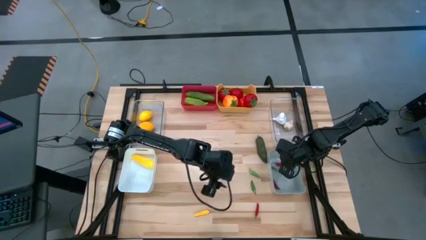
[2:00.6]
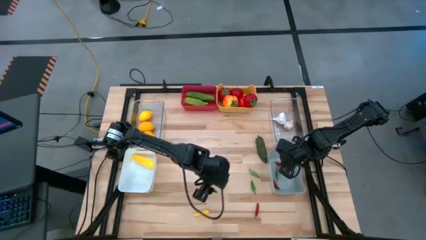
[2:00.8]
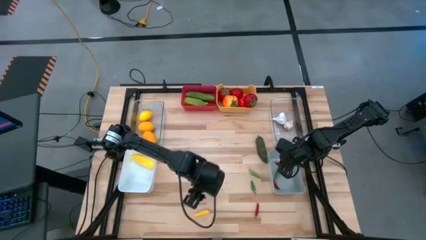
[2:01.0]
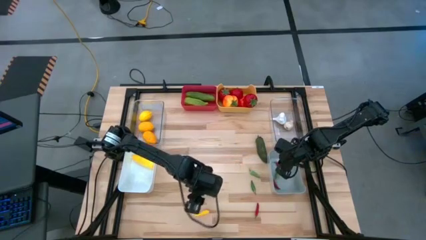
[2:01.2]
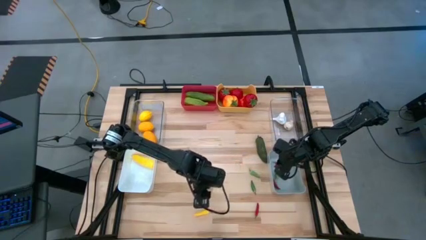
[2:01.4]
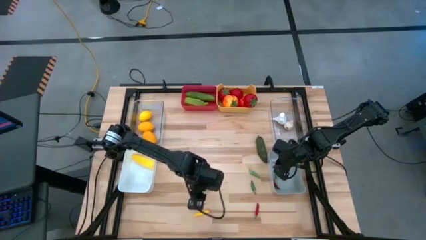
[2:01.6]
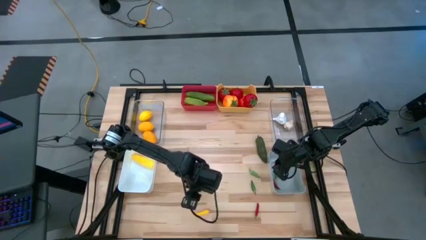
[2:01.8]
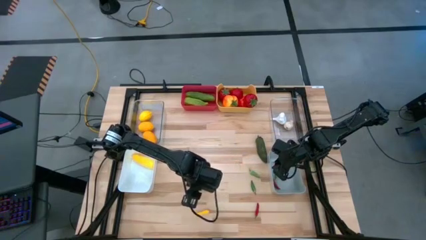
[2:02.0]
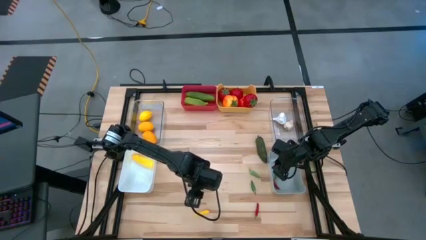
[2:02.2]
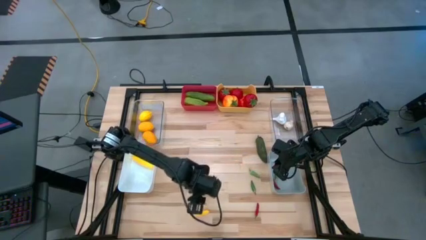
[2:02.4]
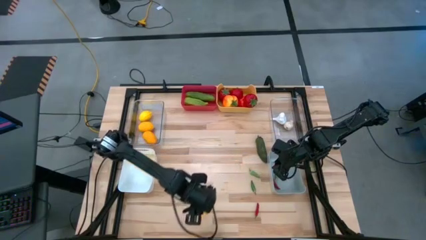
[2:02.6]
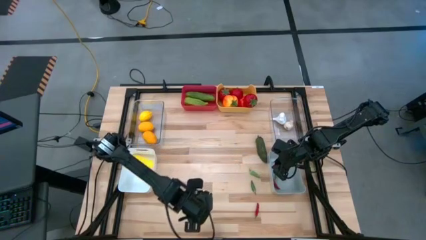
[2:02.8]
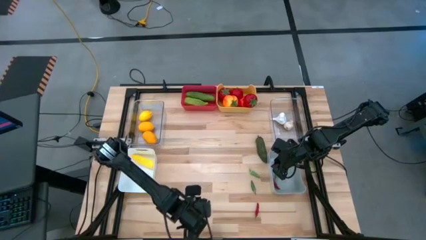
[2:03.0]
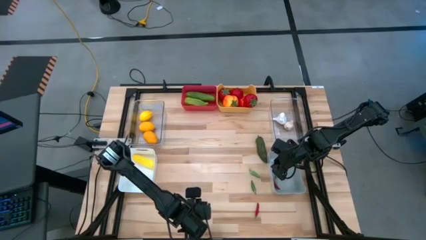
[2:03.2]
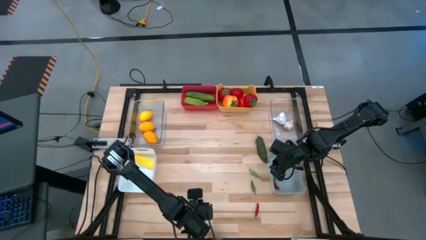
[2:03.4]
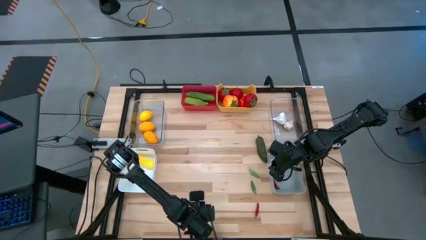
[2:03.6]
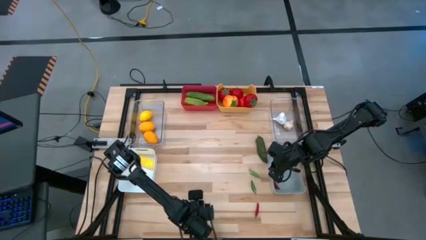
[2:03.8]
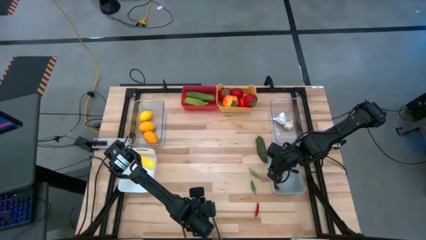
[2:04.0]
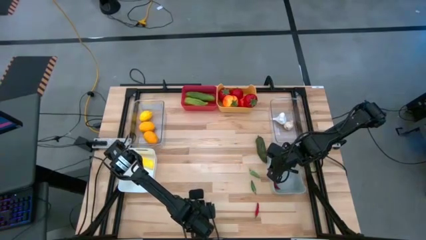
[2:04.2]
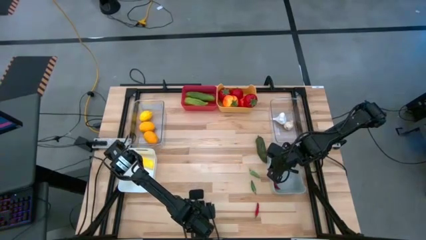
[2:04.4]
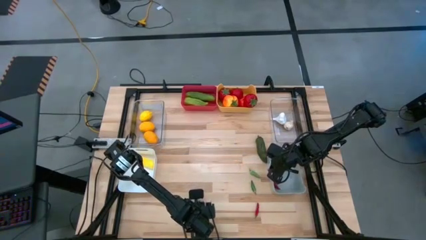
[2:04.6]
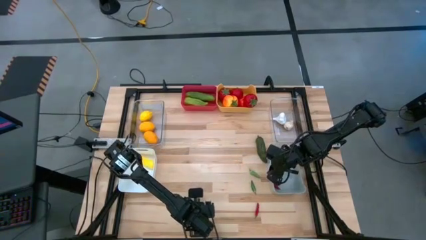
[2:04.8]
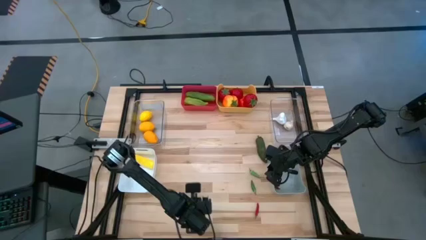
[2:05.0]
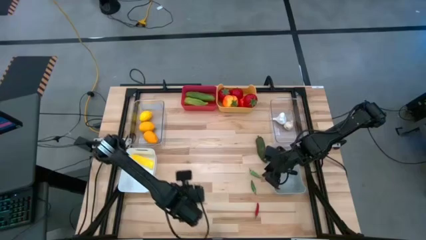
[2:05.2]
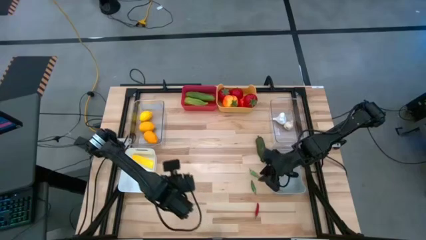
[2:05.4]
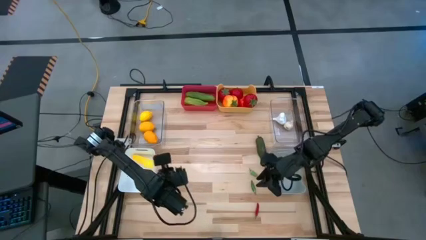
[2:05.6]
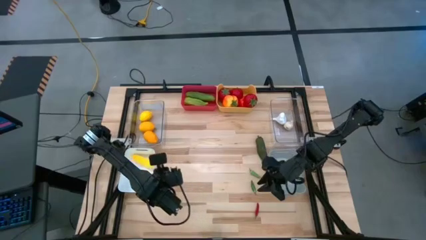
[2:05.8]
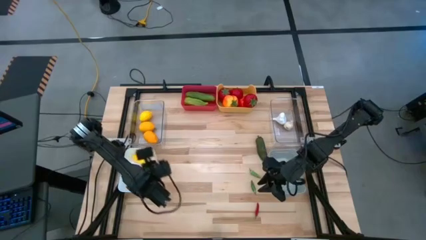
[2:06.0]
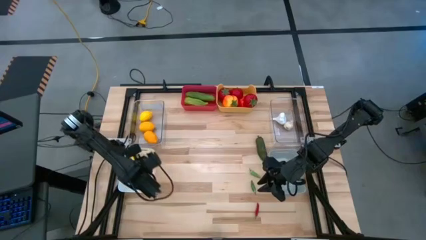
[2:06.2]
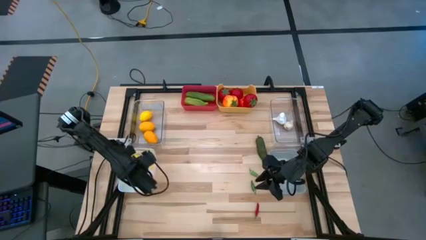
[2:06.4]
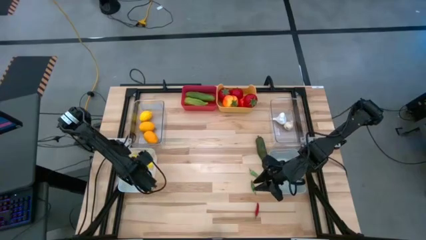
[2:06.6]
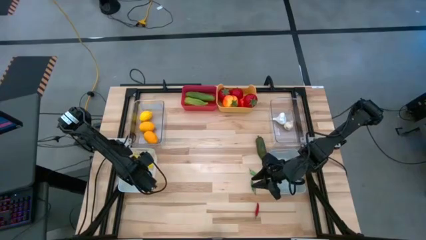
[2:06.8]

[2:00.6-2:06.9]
Task: Sort produce into baskets
Put the yellow corn into the white bin

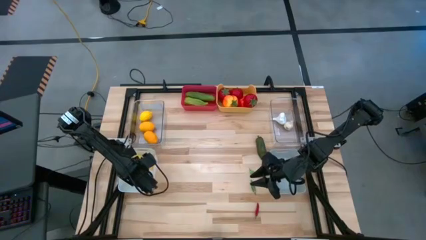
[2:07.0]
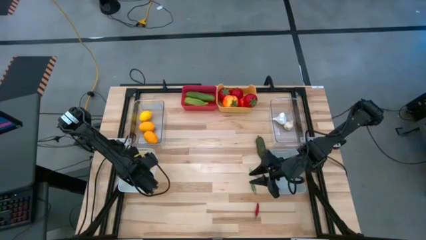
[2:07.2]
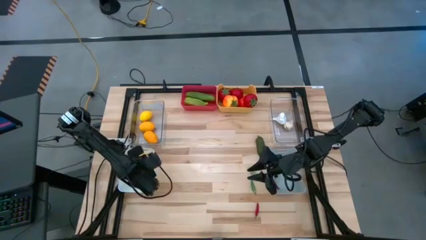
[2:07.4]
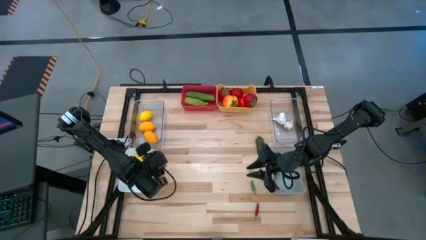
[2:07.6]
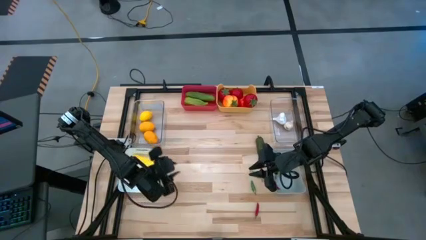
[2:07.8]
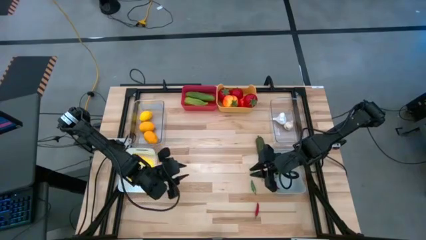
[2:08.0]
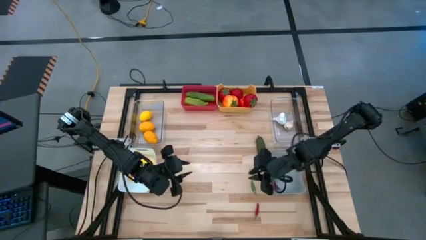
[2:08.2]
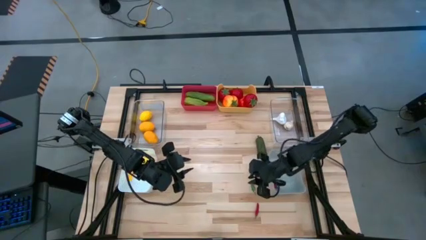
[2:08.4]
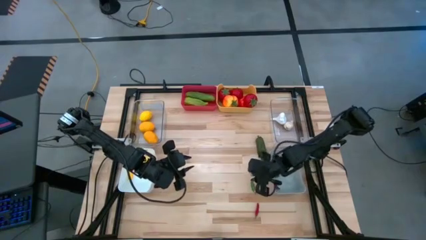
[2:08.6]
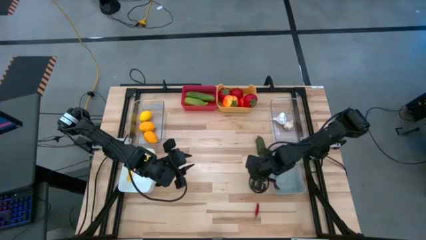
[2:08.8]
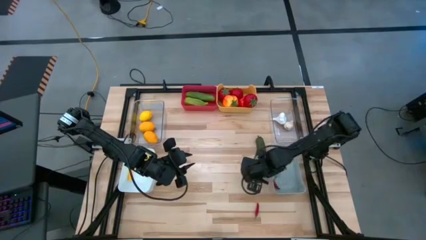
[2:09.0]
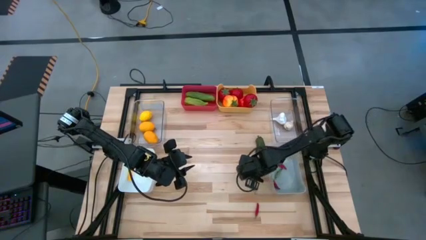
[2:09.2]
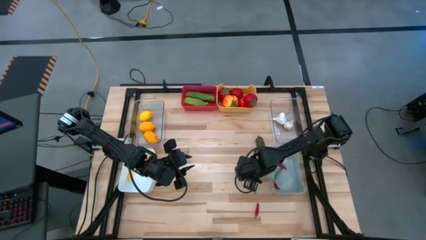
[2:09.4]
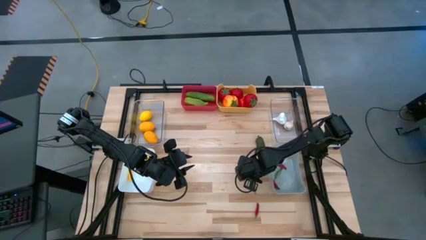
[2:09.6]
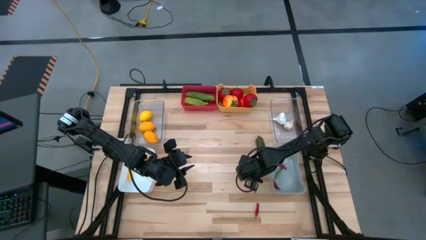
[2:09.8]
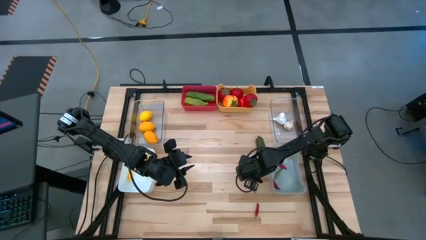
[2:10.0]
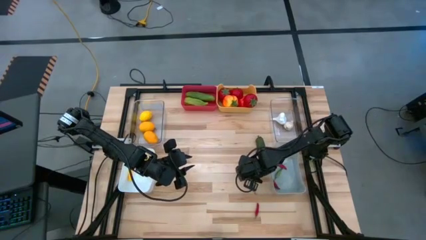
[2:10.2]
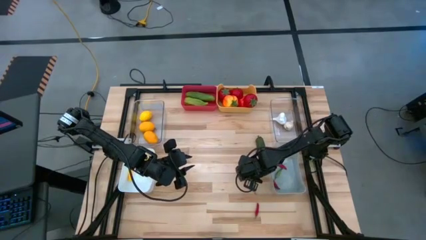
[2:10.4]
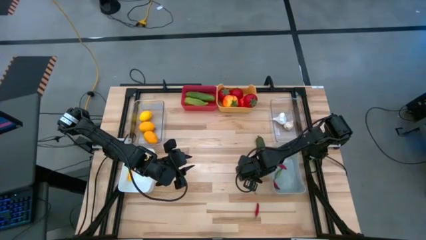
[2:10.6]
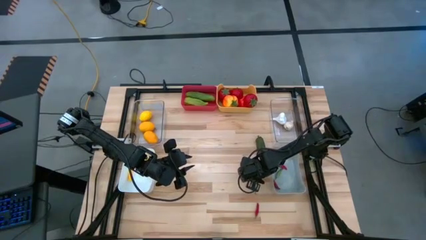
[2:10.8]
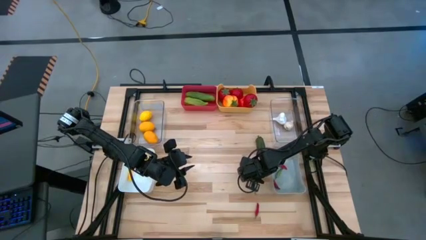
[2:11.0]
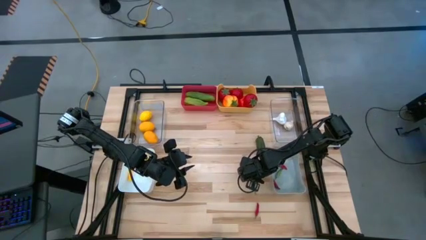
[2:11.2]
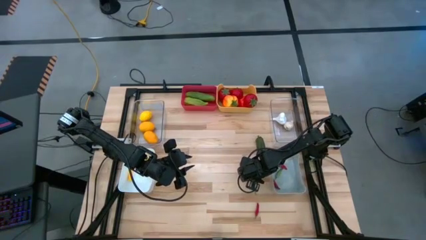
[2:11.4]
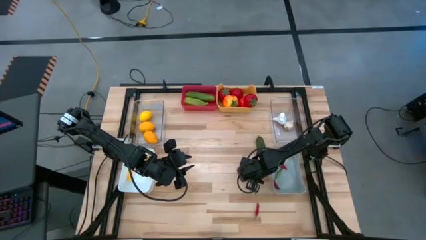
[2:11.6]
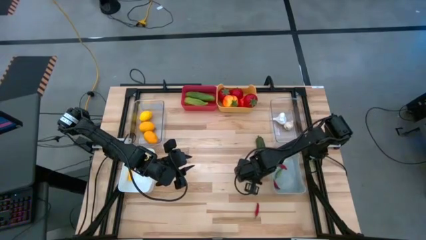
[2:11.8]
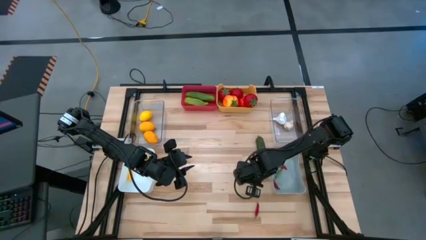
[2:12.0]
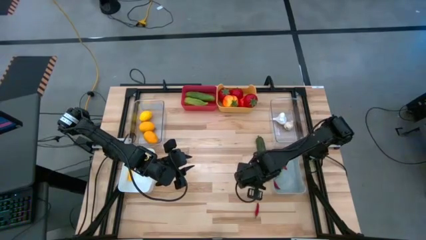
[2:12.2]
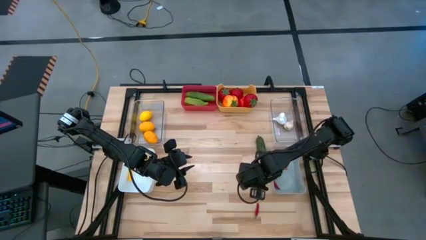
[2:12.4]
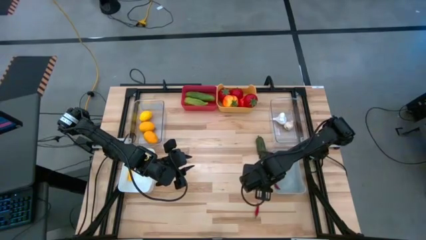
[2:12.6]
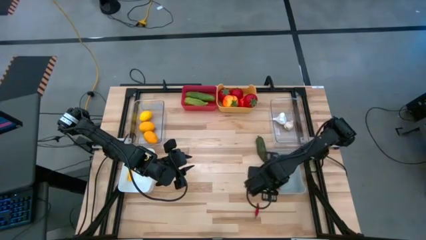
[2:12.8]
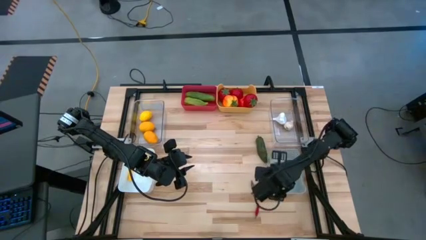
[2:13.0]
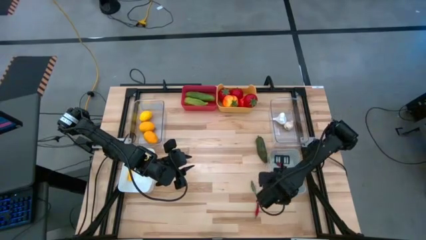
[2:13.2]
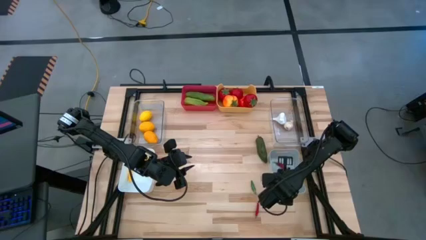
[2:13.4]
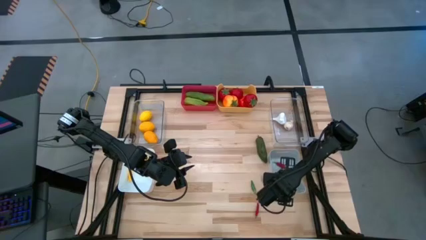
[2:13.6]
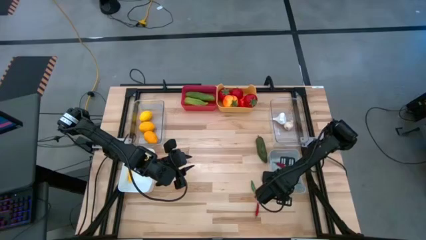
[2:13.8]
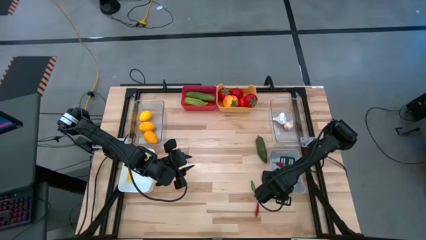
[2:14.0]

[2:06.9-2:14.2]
Put the green chili pepper into the gray bin

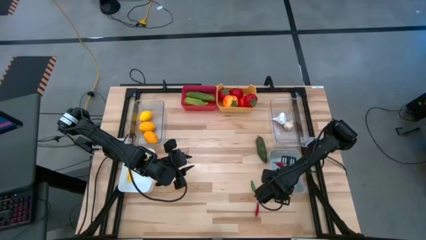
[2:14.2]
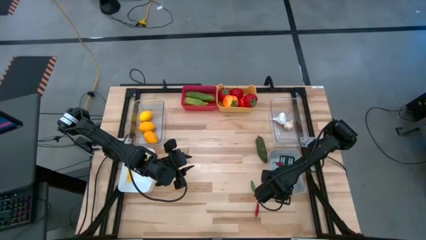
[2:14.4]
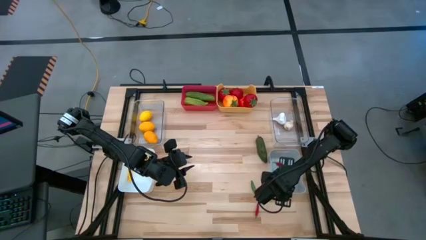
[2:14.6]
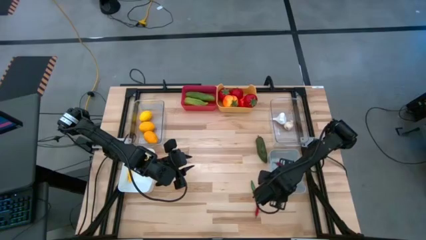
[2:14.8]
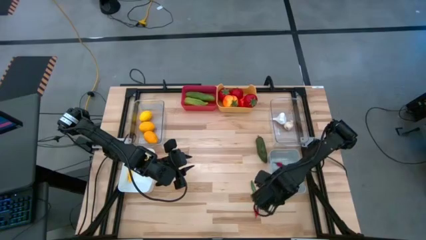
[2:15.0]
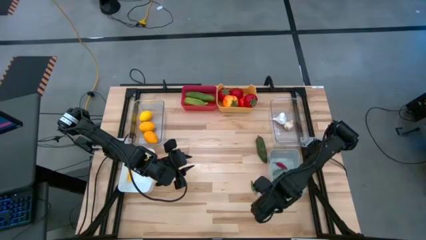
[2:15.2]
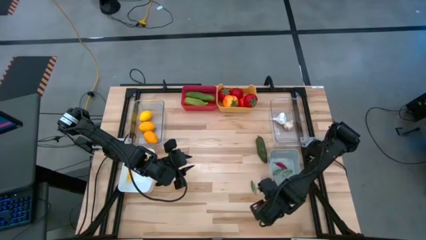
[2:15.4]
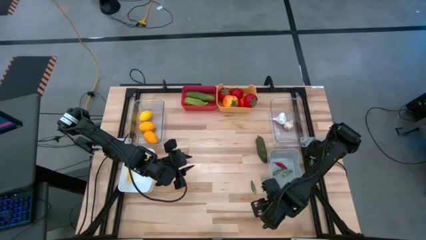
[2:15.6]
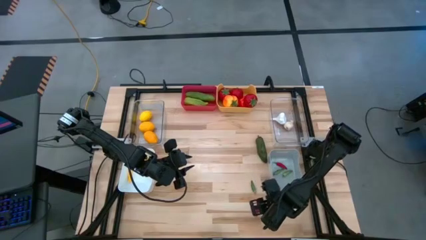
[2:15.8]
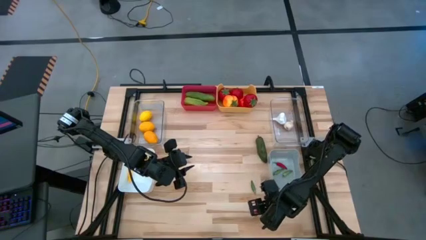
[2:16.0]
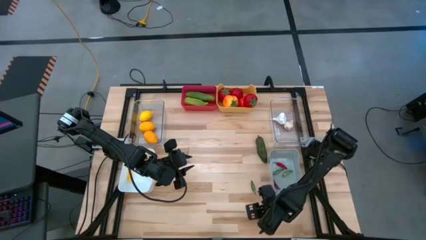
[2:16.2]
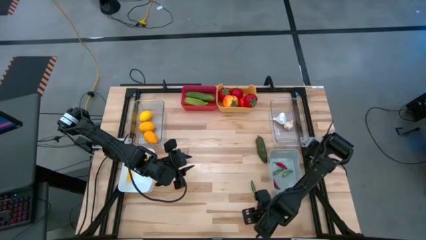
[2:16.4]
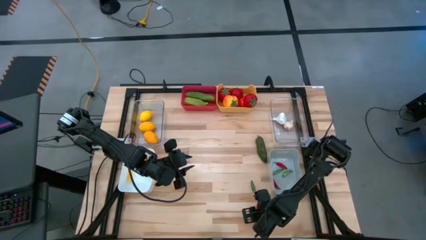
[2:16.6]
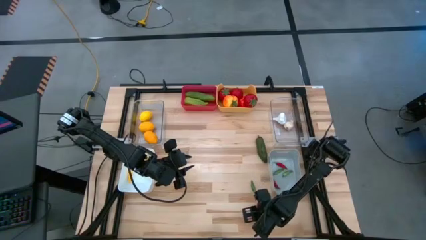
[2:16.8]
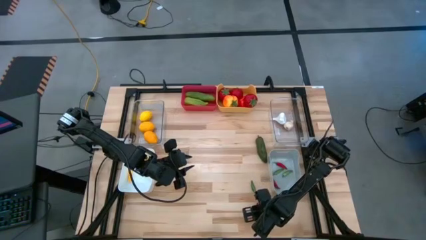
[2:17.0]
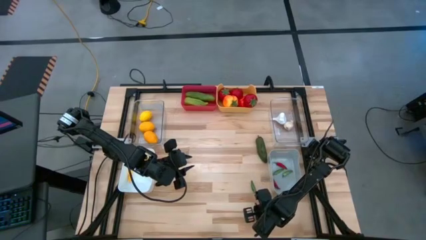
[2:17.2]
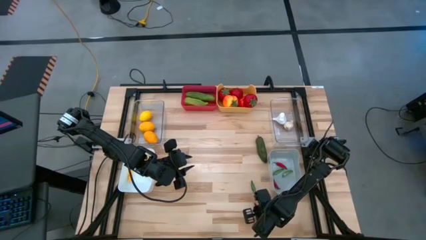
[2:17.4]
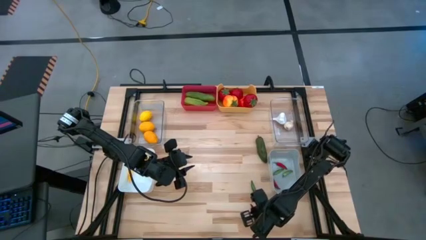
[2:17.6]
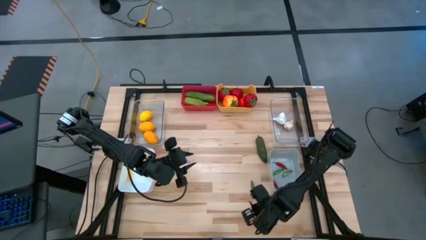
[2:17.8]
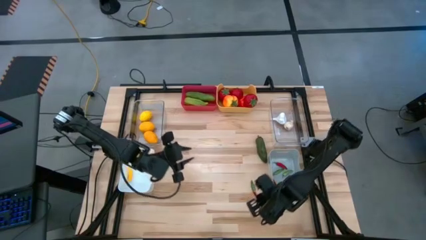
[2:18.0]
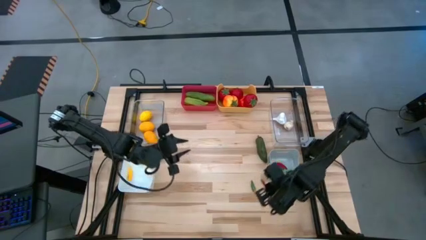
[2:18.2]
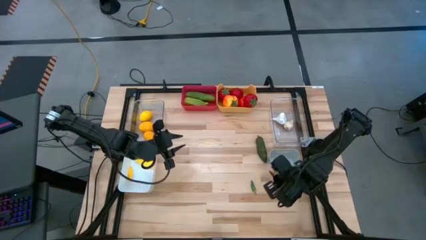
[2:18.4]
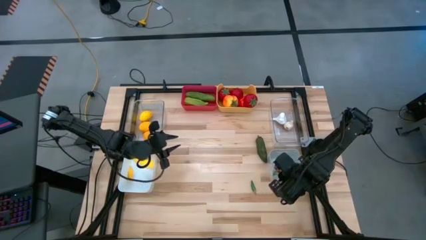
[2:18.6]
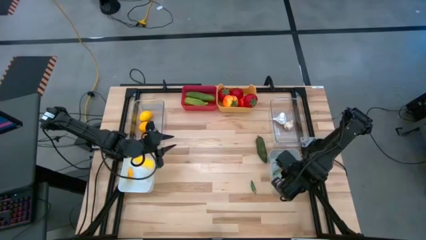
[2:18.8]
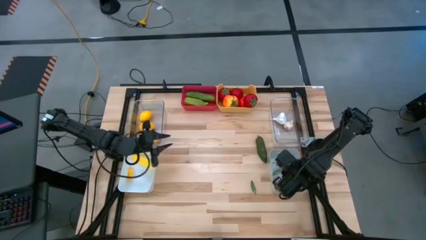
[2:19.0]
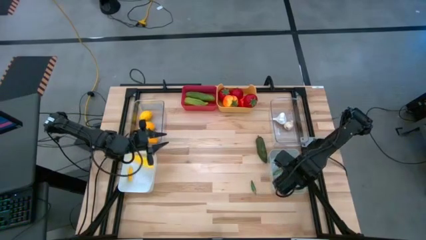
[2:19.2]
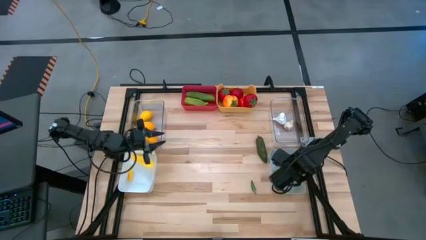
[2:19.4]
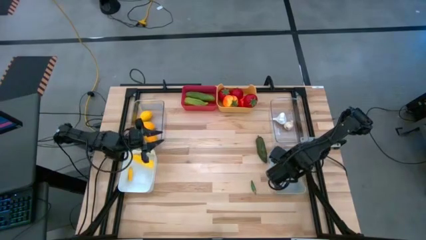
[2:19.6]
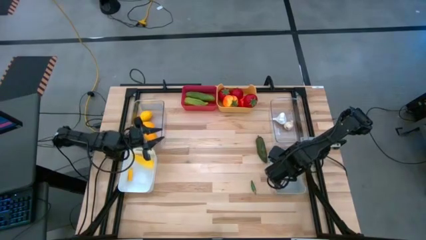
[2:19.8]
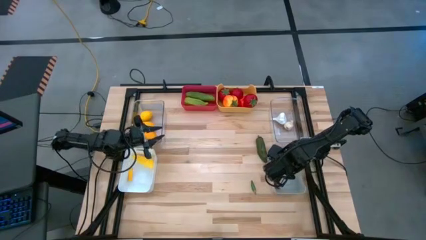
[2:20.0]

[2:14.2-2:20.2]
Put the red chili pepper into the gray bin
